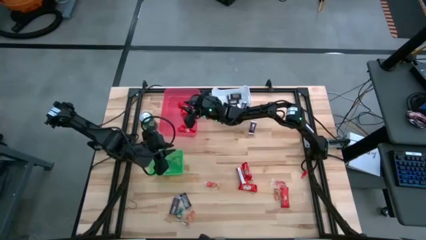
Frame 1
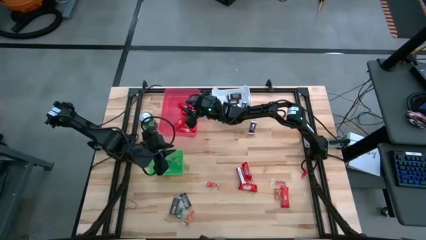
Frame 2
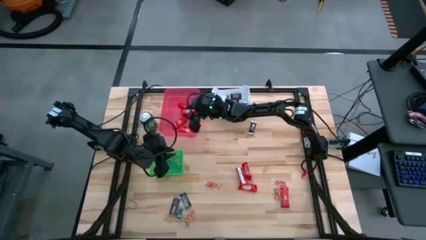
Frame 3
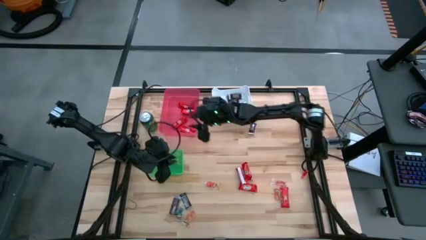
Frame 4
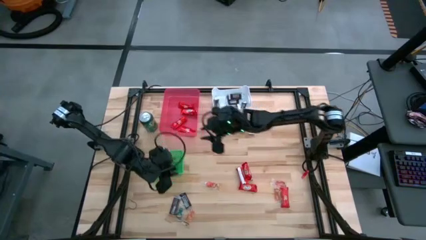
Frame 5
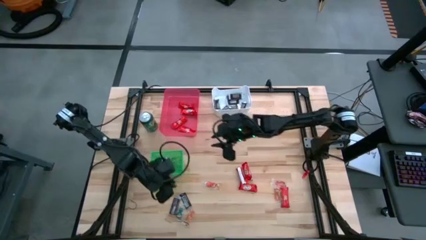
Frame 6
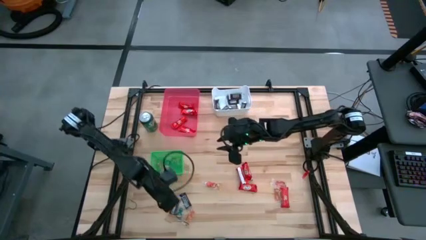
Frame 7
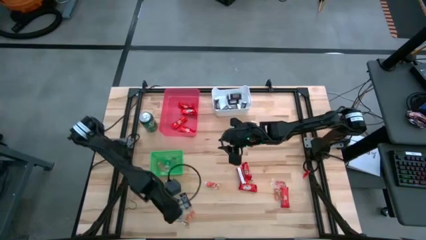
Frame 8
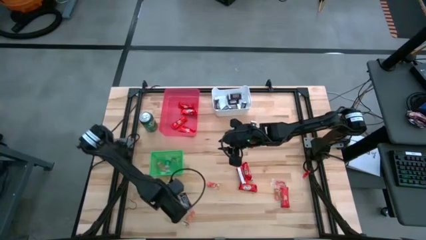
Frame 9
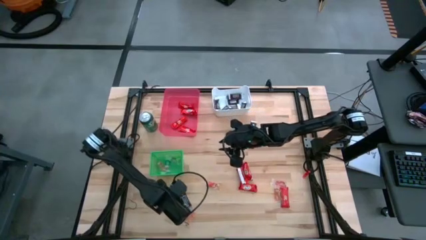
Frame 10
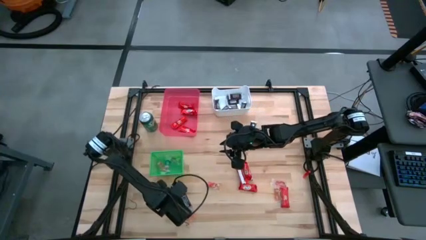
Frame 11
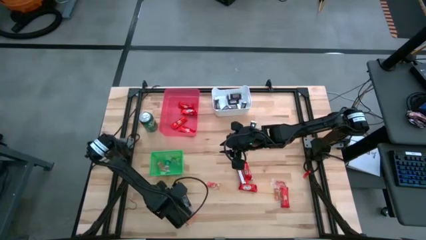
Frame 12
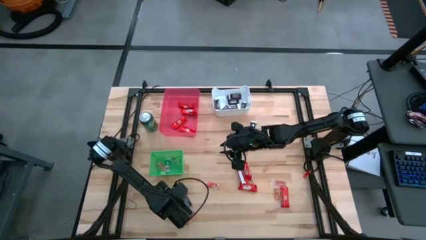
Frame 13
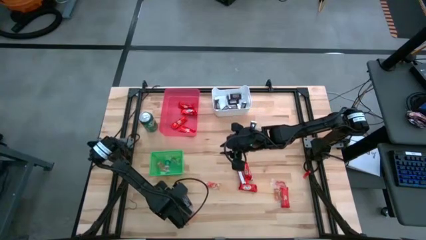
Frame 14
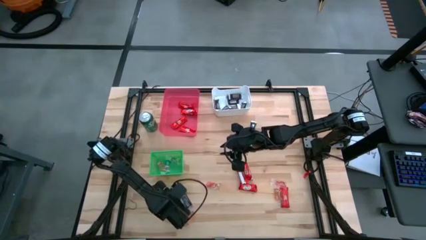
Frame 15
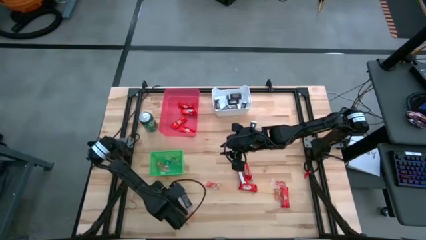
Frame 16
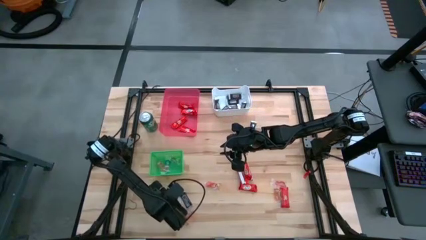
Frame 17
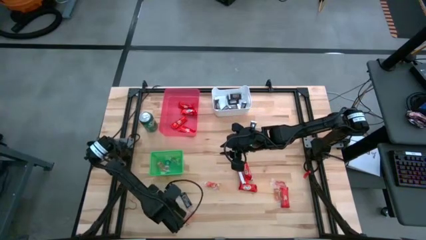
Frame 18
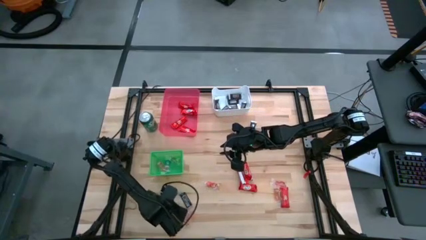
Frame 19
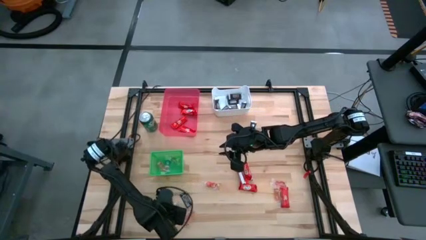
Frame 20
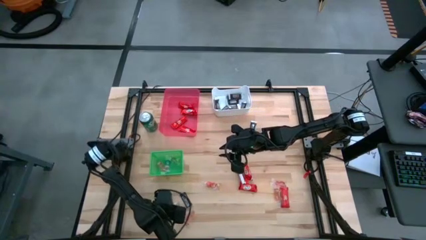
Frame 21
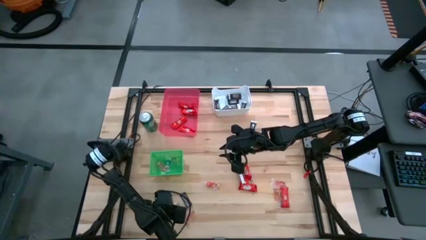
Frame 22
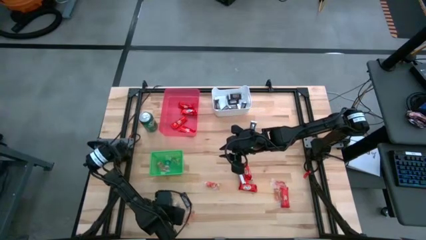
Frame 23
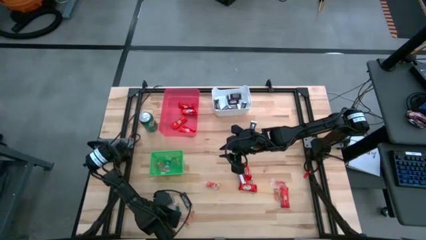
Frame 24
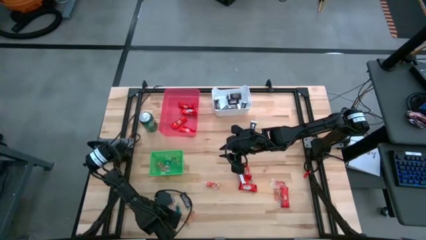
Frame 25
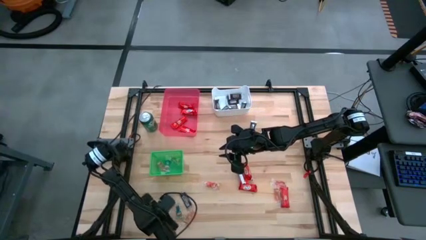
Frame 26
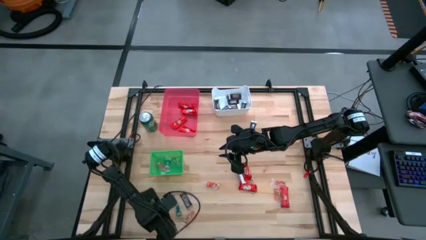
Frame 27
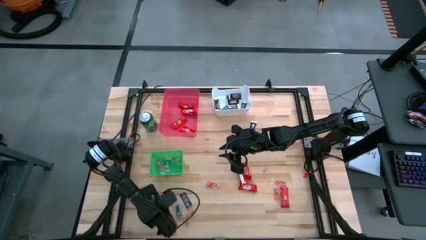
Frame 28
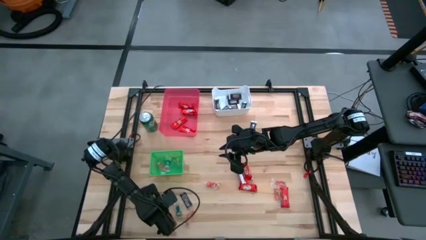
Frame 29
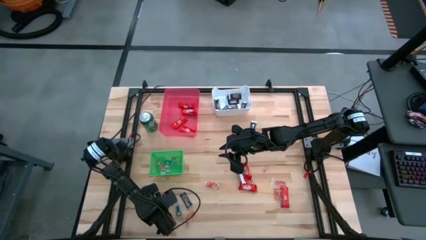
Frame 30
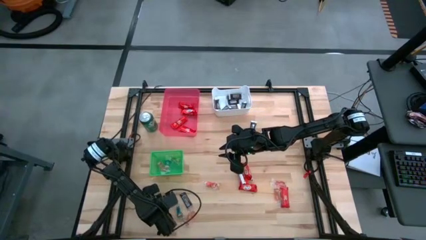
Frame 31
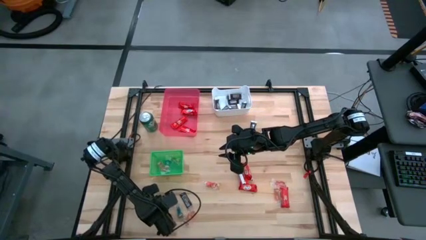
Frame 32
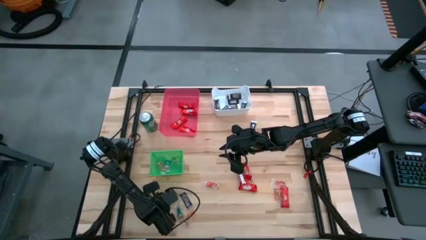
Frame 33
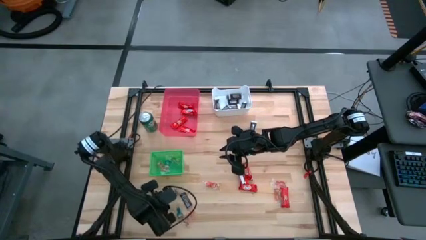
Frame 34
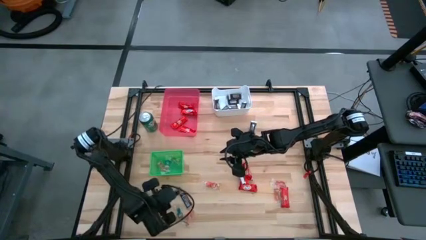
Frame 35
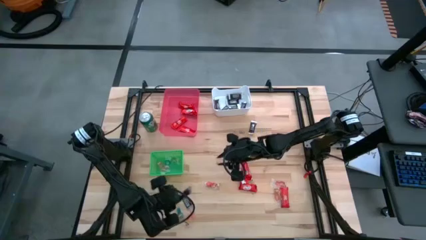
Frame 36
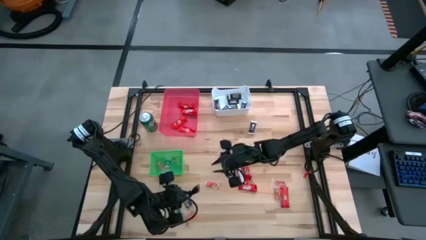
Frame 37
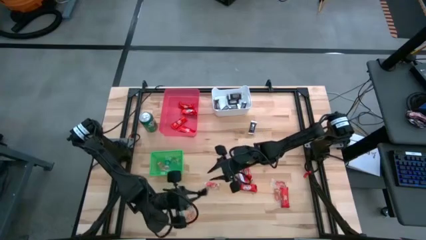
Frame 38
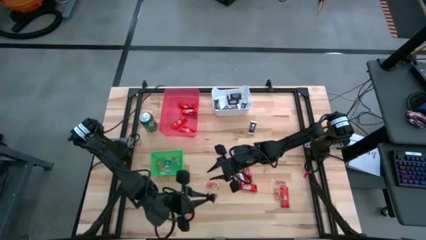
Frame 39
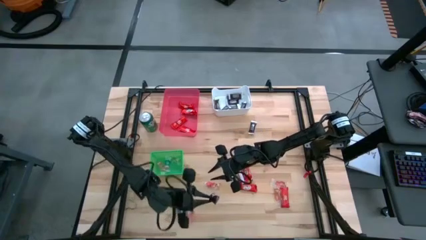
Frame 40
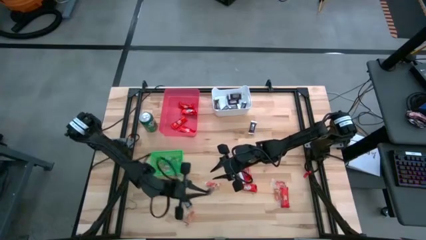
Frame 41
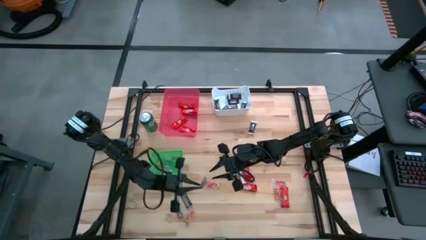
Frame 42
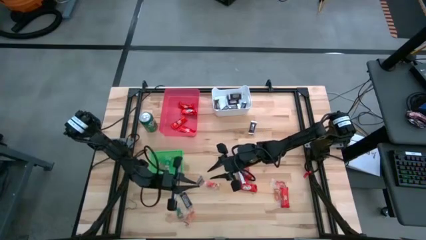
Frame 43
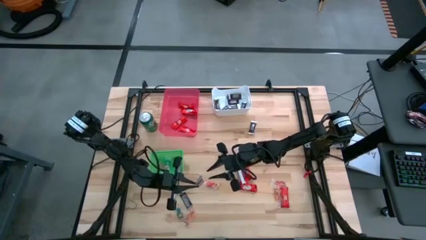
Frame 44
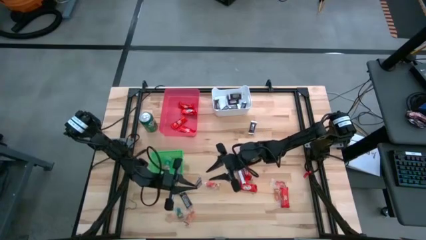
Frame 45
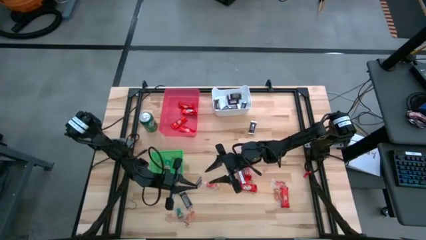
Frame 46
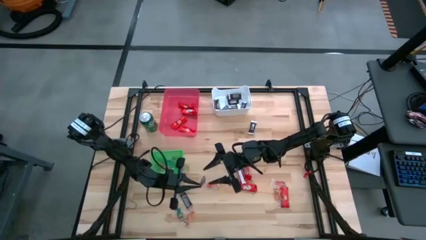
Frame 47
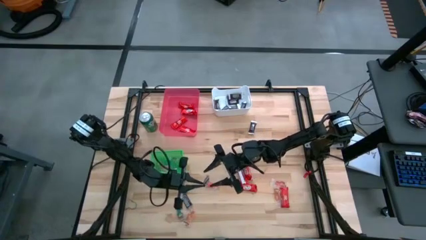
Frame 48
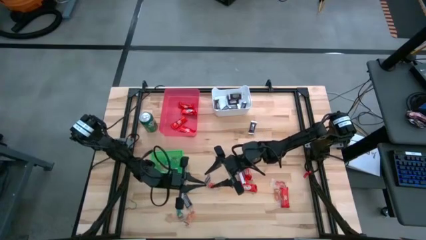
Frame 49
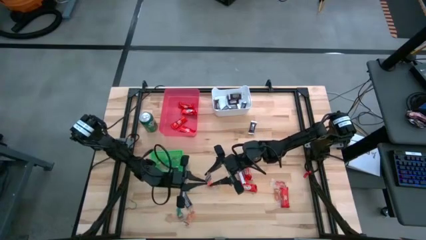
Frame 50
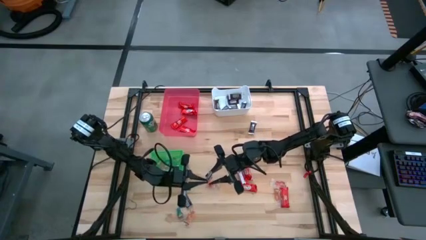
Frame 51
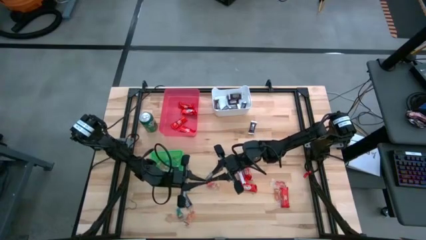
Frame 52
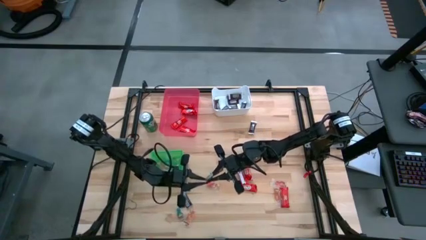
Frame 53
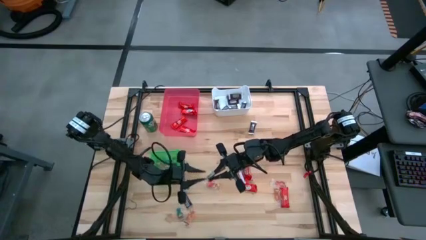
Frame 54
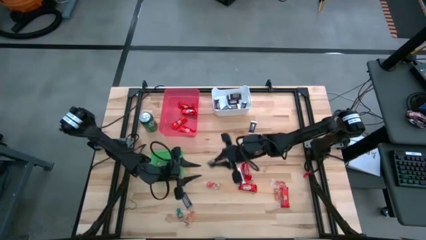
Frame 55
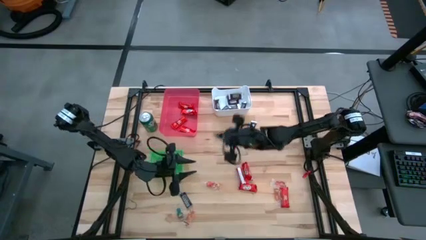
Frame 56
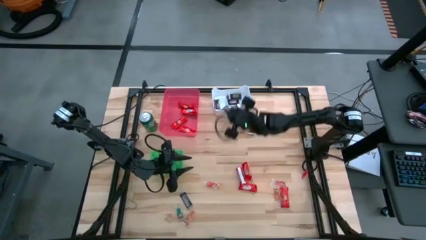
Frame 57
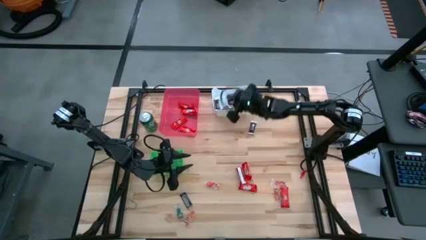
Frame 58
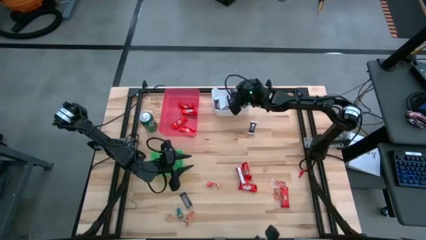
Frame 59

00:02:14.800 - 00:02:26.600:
Task: Organize candy in baskets
Put the brown chocolate into the white bin

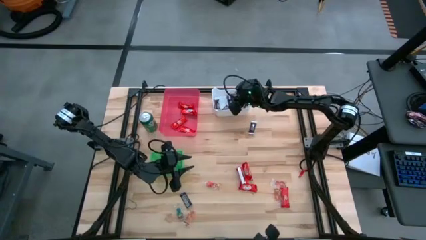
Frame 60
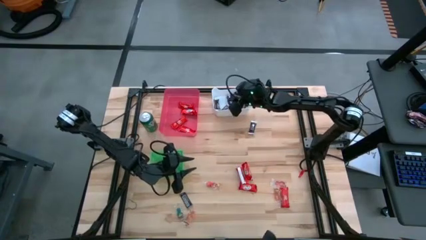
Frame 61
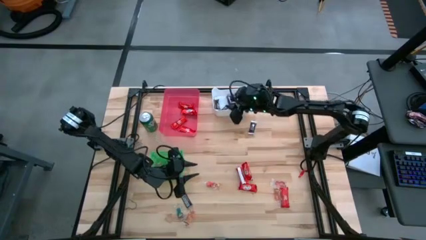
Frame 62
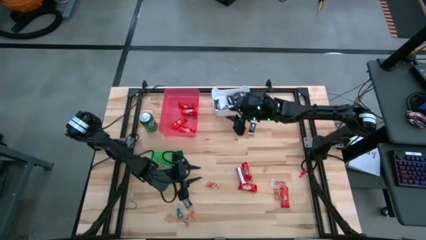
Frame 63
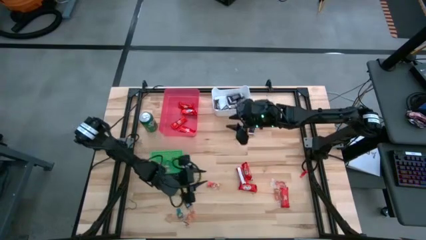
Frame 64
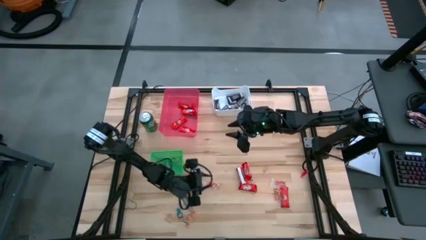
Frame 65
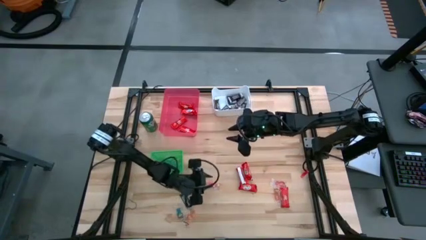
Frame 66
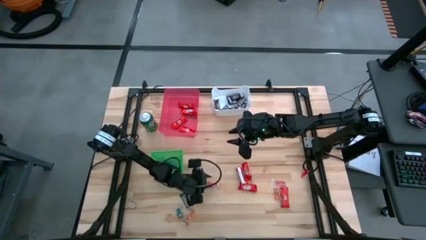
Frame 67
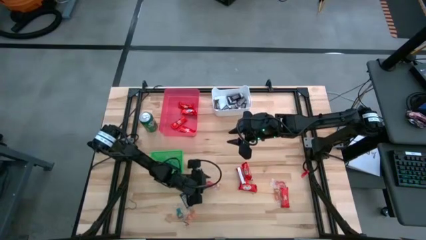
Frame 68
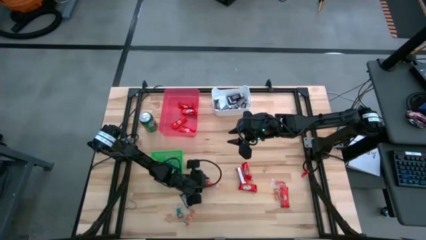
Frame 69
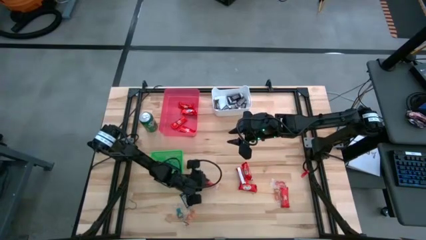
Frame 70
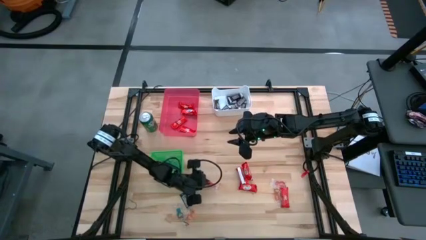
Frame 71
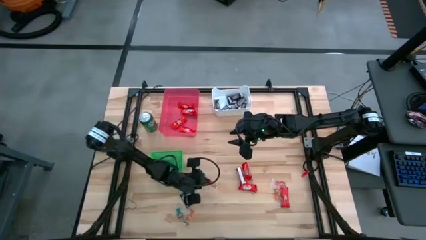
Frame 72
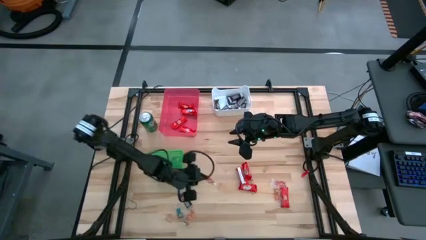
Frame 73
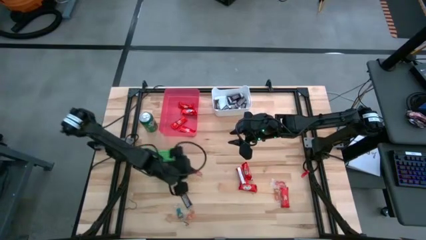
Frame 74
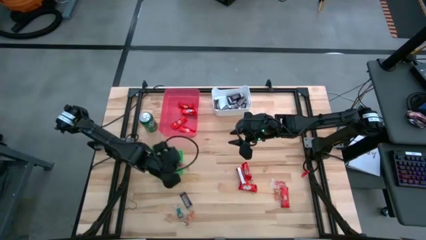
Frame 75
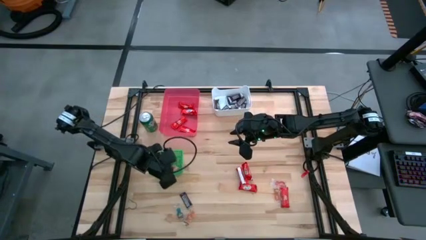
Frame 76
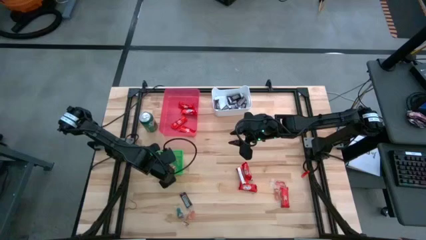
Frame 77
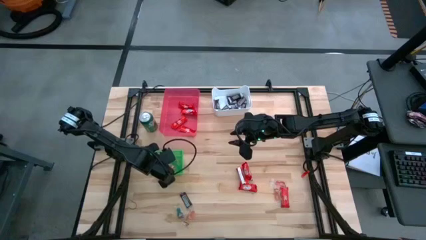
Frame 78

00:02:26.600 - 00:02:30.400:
Put the orange gummy into the green bin
